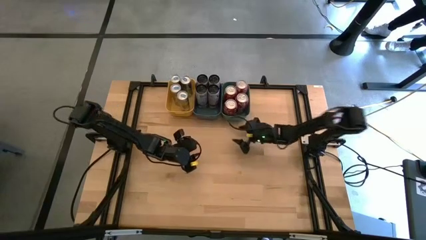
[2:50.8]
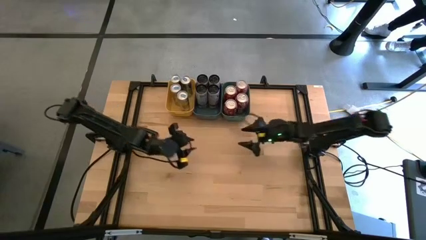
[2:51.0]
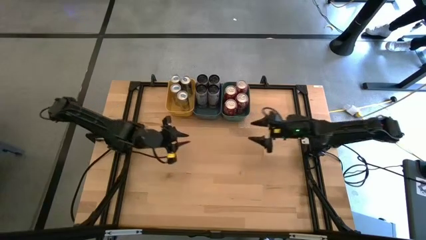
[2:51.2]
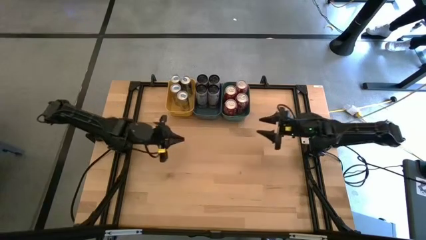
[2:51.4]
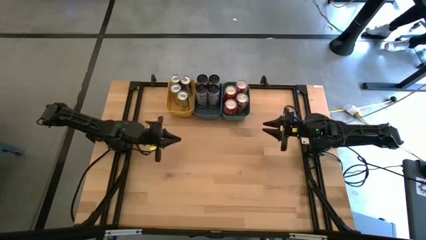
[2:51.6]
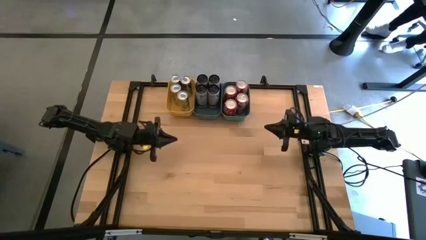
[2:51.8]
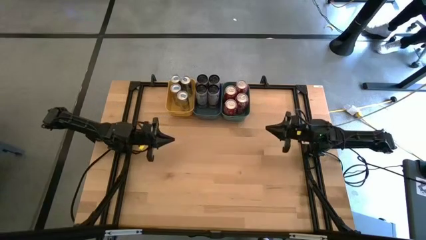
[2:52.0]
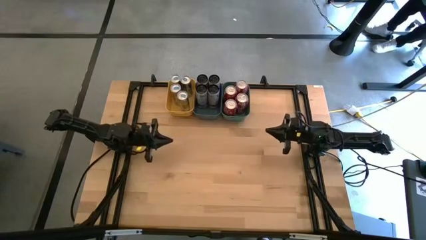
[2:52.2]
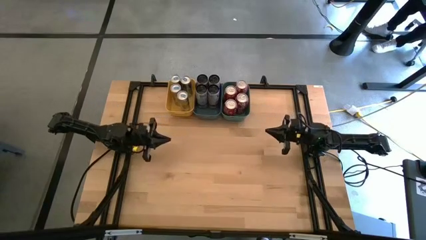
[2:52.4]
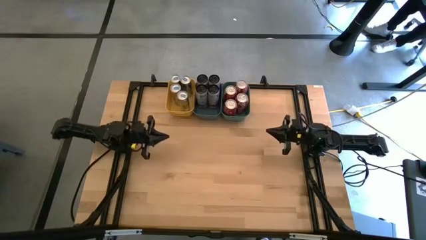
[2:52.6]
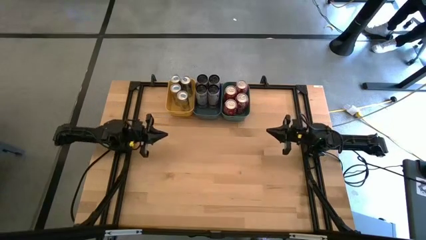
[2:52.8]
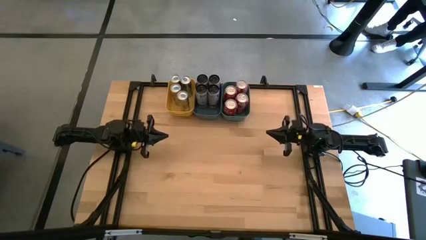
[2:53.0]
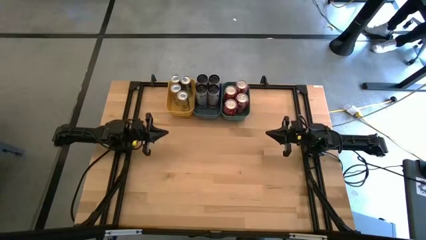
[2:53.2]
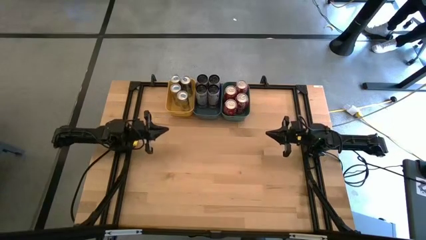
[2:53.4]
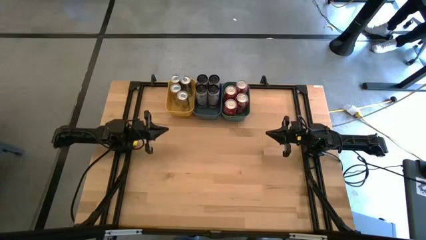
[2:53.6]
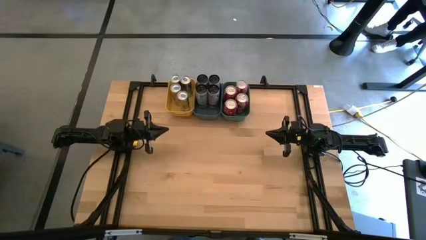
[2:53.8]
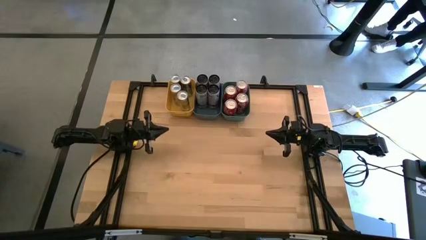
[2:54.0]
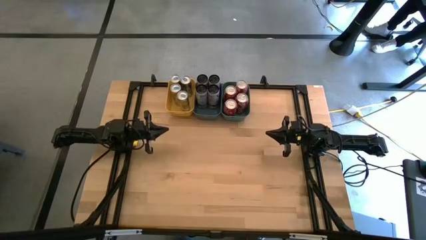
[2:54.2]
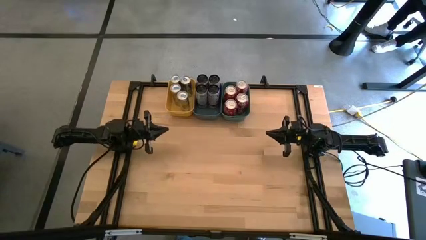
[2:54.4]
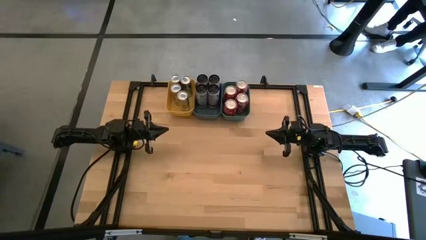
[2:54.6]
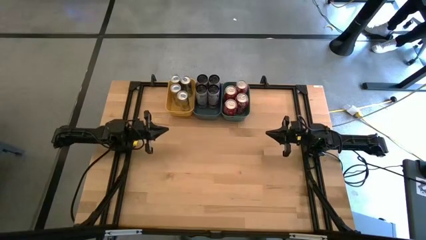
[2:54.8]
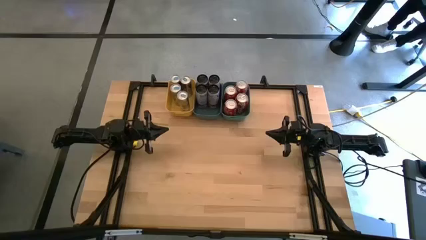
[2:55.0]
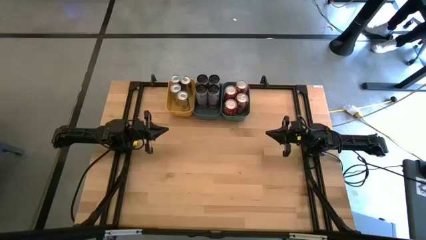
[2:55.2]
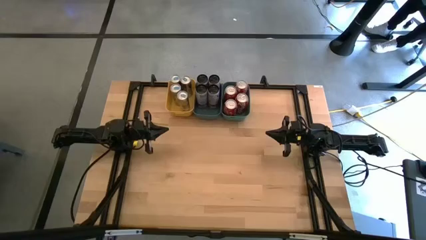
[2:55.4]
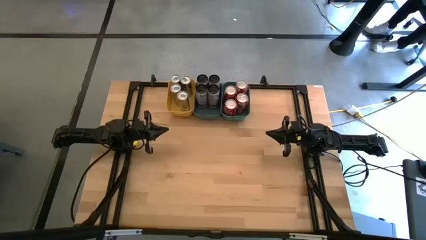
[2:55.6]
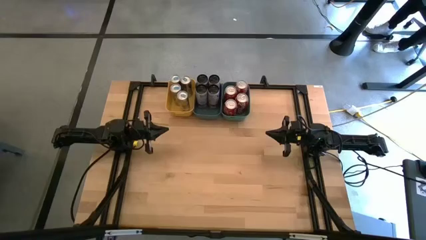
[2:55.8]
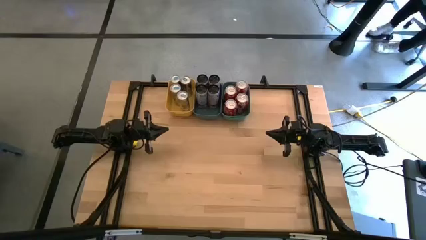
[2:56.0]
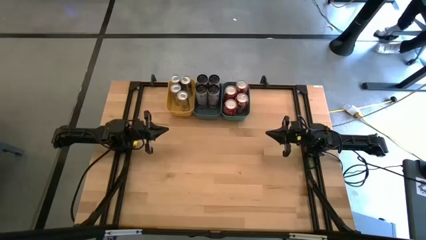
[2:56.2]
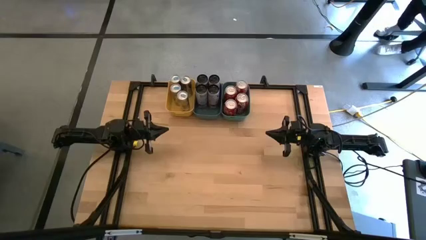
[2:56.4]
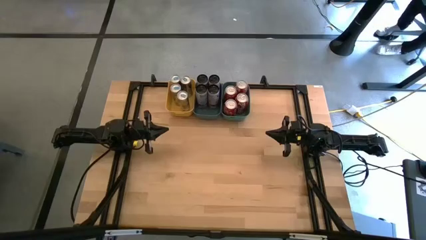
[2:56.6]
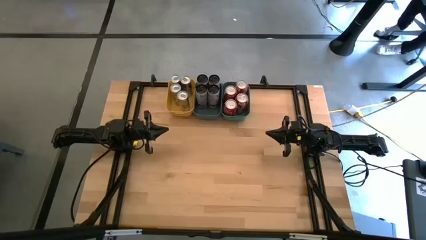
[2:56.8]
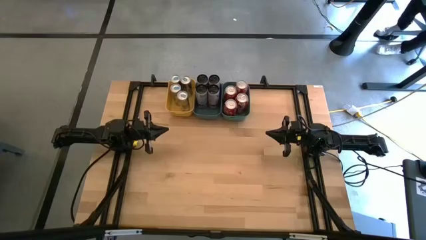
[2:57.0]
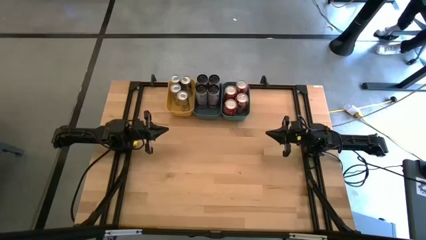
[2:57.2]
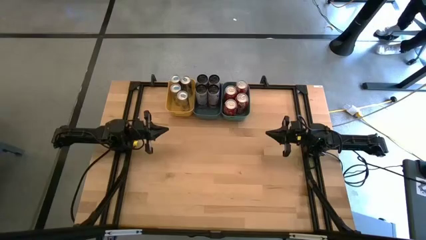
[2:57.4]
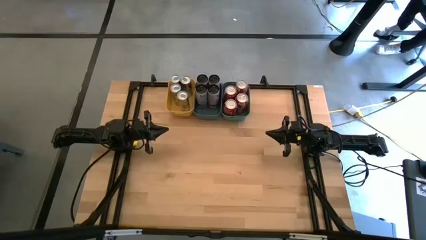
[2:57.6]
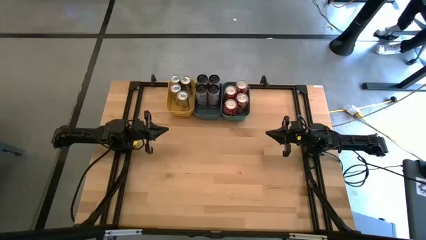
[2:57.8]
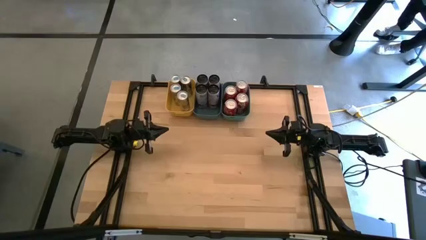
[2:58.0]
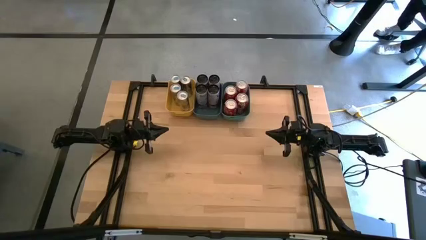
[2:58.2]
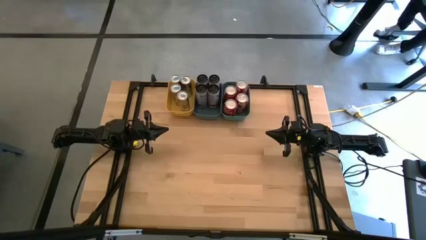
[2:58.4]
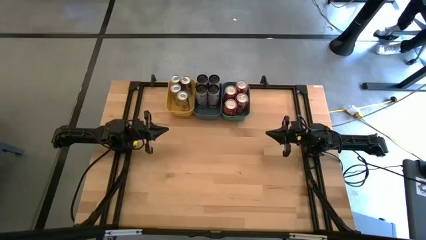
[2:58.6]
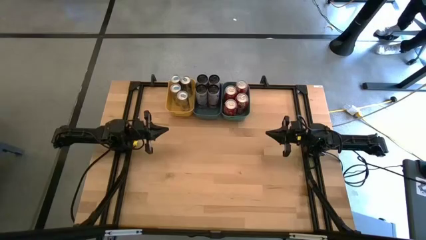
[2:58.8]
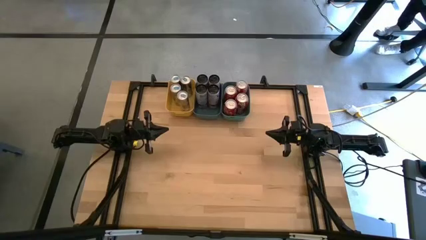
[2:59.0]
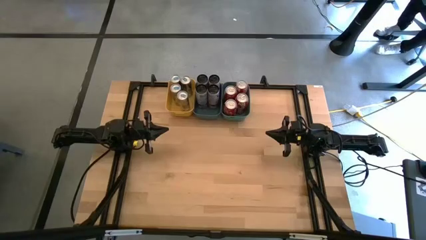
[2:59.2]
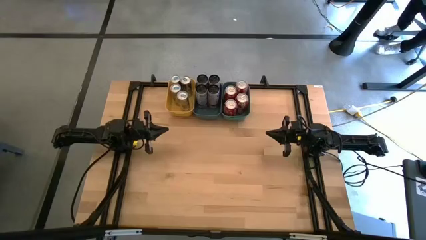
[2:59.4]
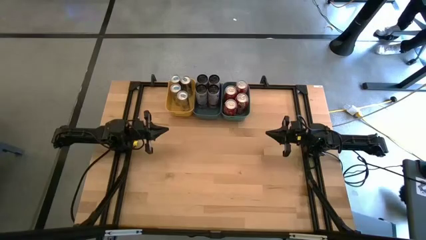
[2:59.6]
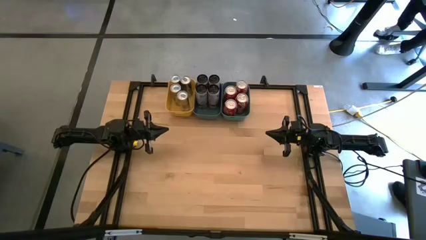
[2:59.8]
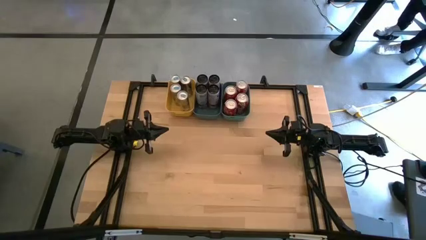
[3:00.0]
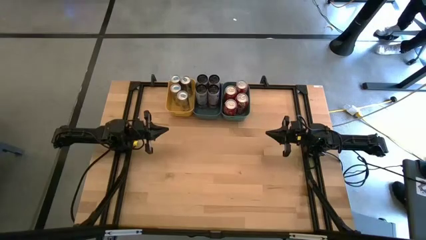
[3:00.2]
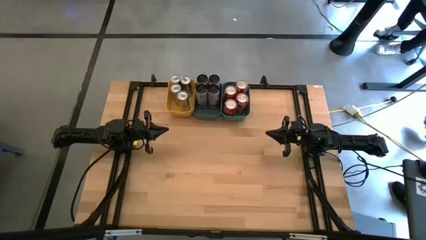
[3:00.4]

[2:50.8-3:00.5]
Task: Sort soda cans
Return to Home Position

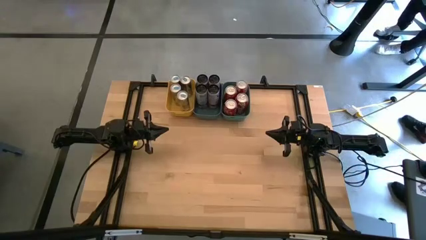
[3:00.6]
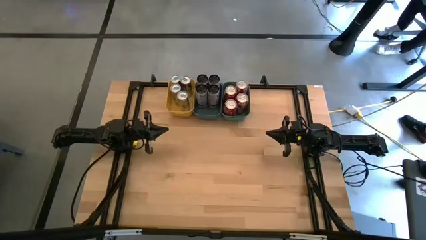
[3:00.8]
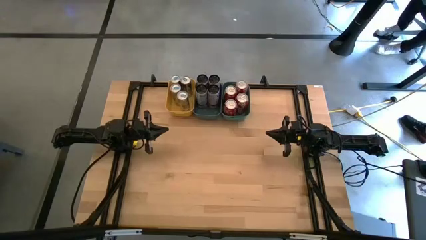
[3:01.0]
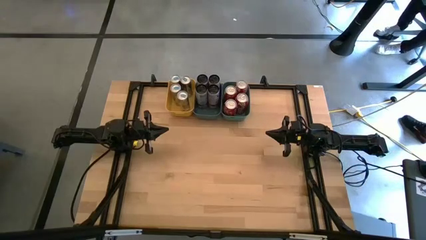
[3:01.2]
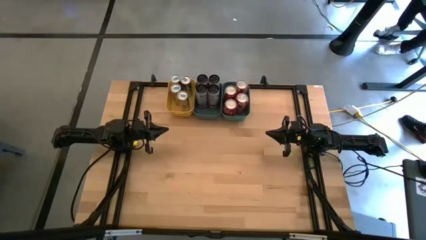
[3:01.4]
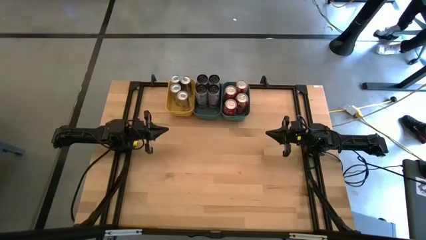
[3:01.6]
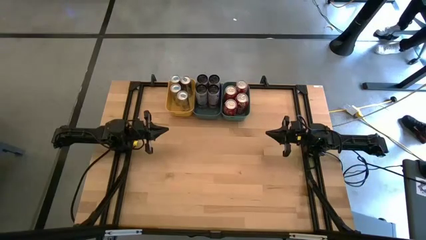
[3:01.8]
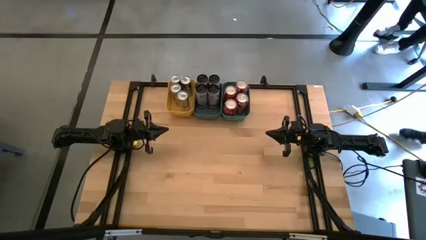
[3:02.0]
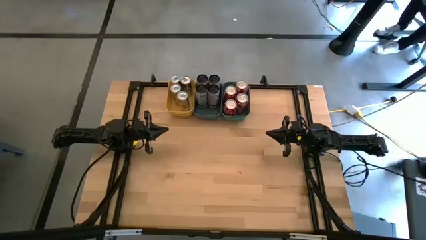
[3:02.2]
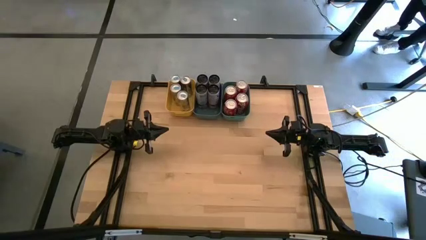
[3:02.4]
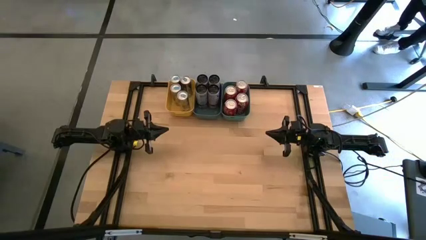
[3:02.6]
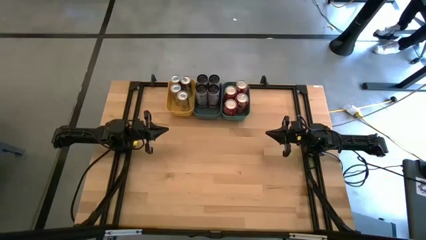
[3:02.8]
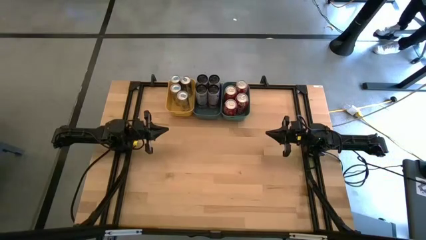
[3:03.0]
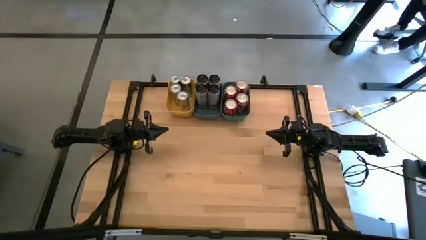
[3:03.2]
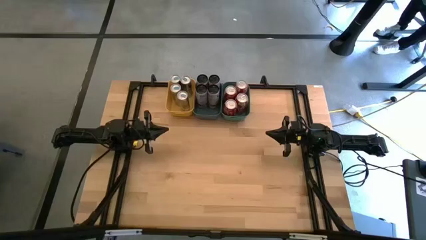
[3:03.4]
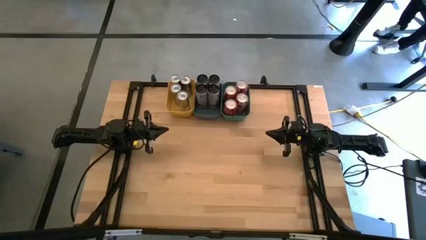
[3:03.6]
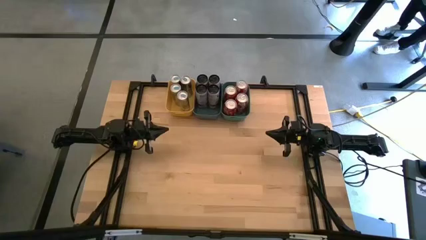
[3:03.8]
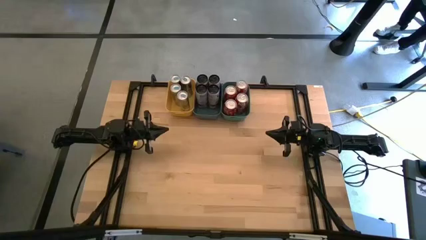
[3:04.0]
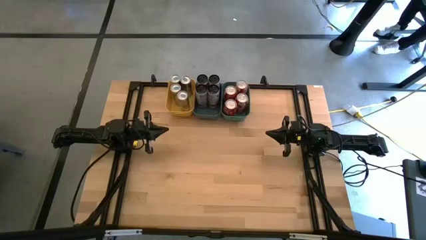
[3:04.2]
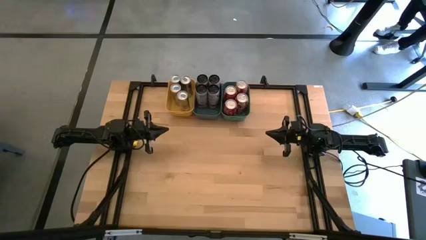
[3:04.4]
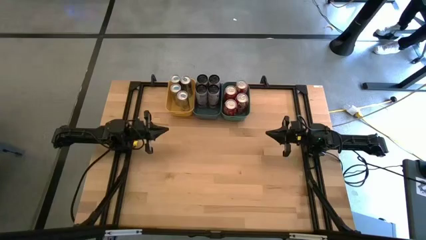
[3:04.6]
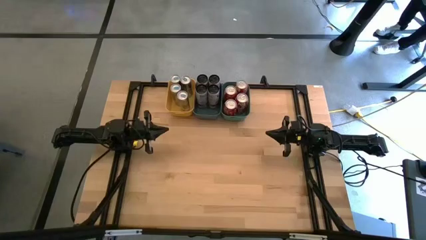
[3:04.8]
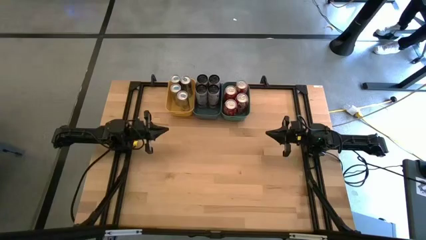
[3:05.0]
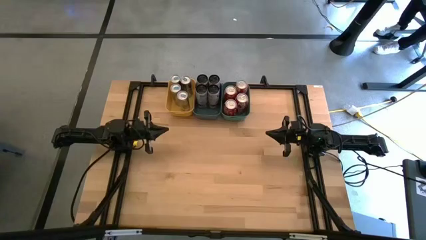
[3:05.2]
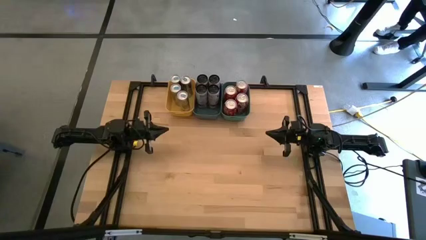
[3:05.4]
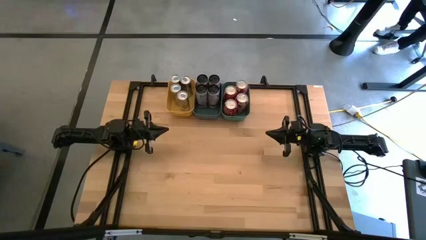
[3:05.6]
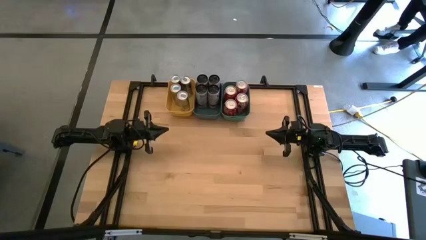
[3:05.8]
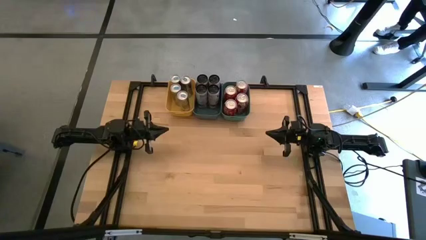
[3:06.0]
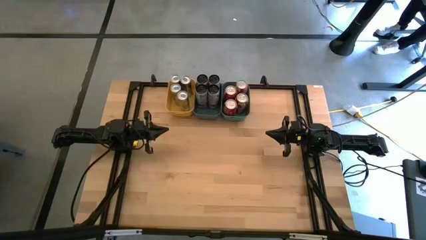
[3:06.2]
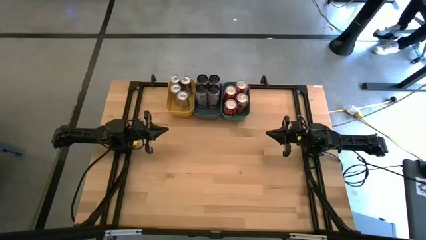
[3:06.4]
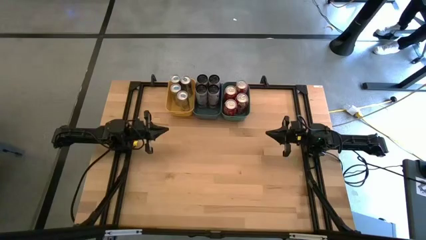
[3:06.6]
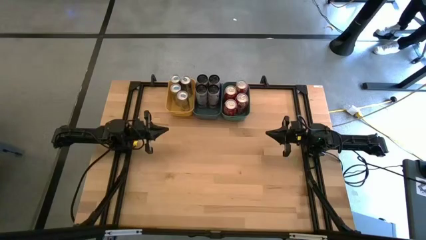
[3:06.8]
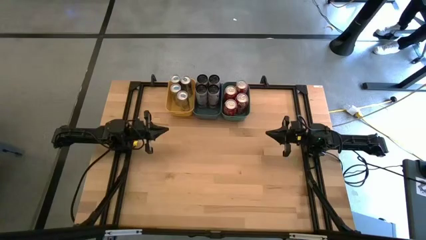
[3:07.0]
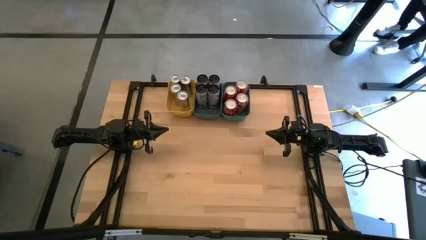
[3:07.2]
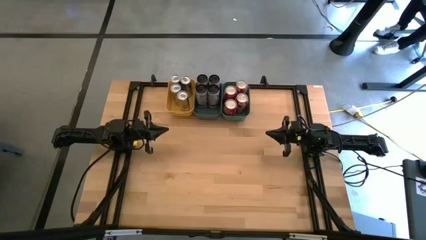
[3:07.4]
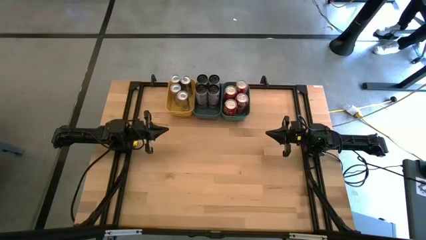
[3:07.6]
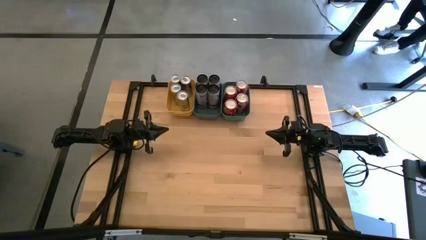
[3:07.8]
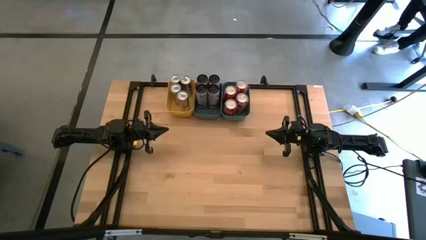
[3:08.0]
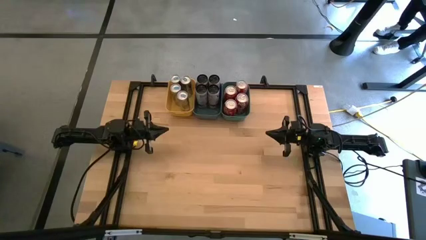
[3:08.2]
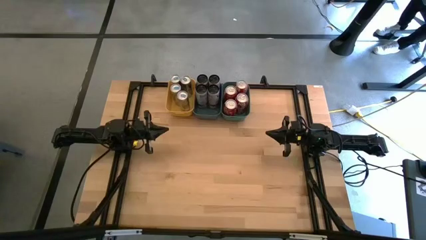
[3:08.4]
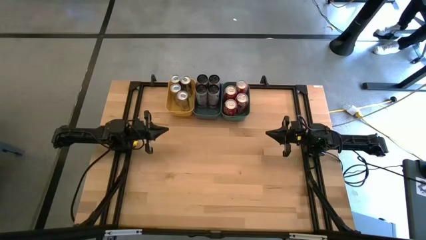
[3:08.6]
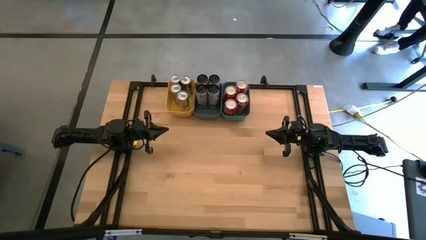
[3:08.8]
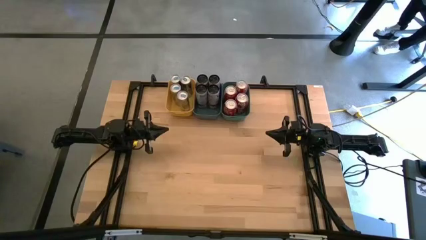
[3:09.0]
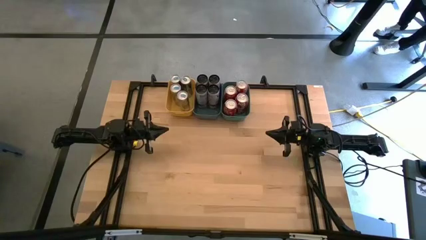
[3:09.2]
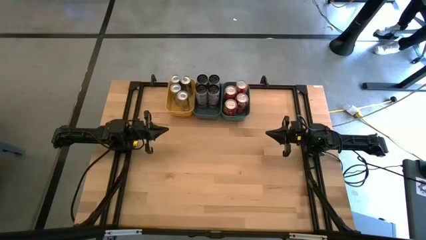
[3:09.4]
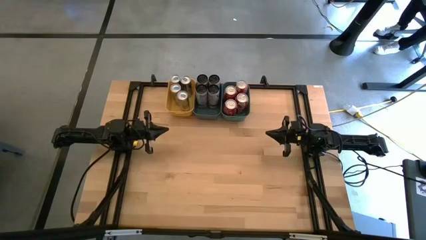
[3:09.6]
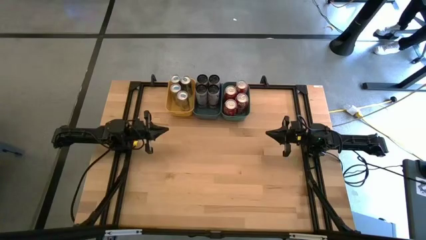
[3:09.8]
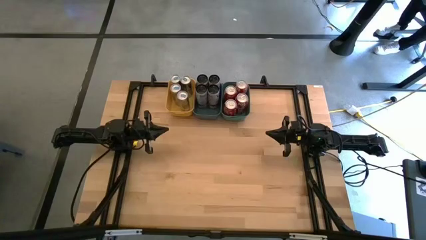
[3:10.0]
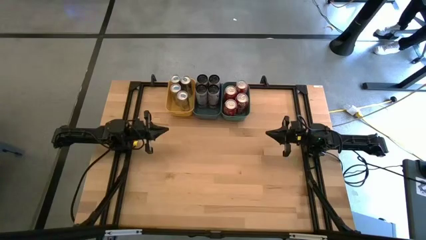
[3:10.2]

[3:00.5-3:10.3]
Return to Home Position
